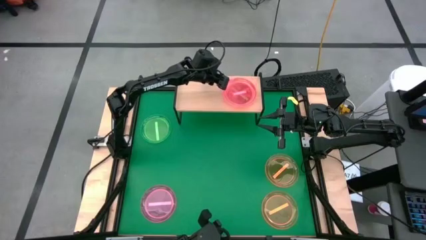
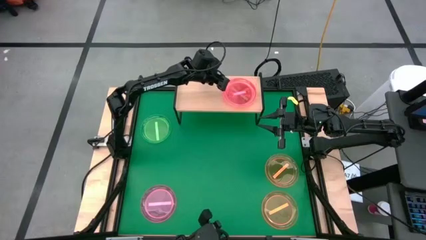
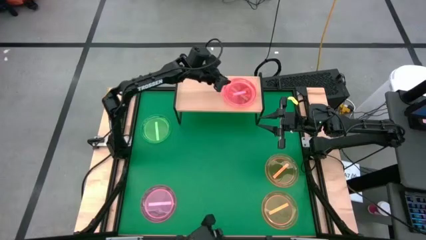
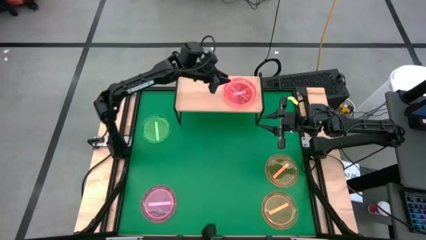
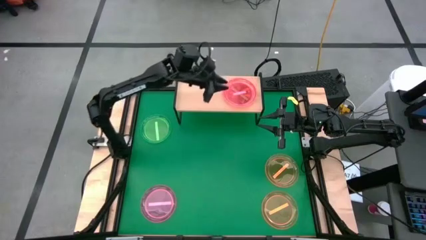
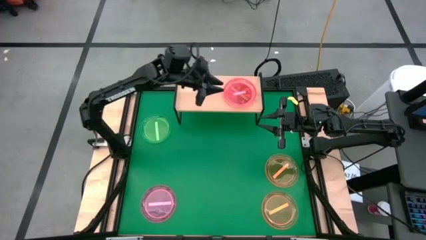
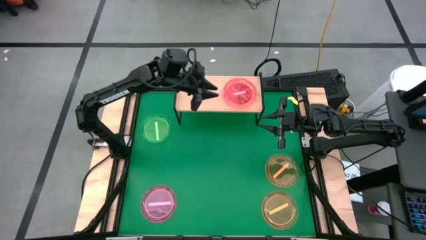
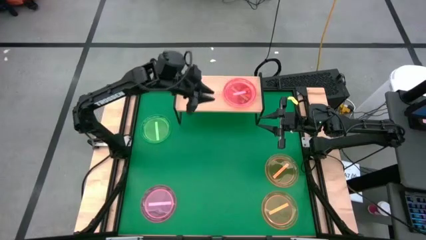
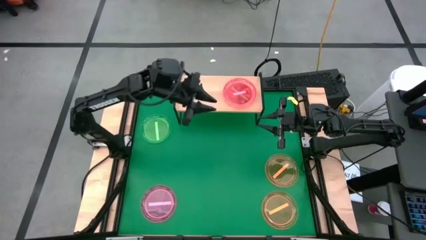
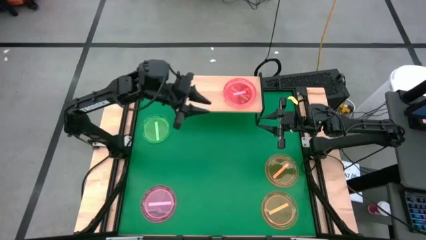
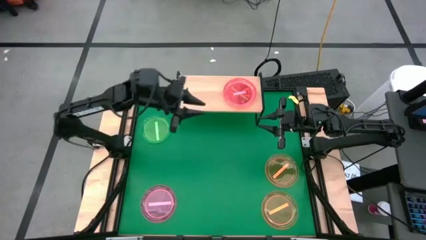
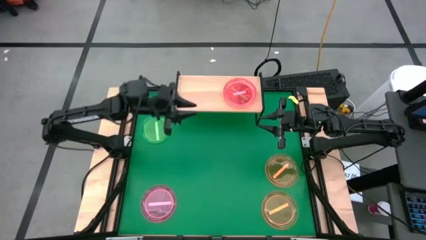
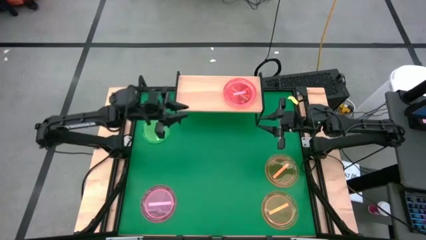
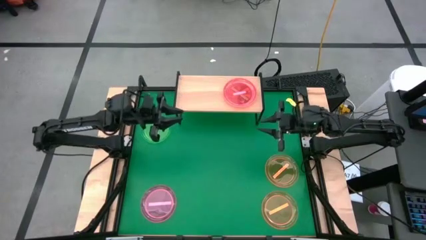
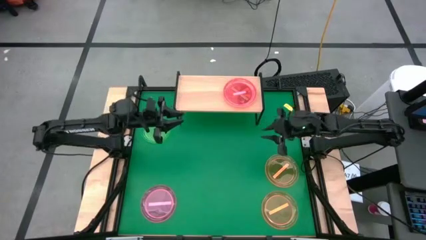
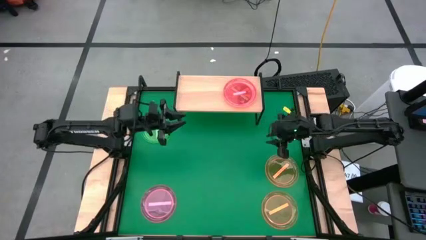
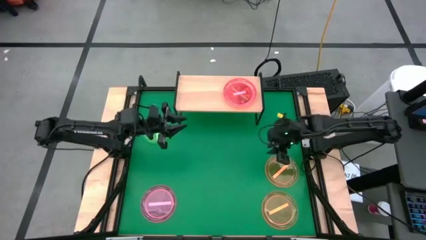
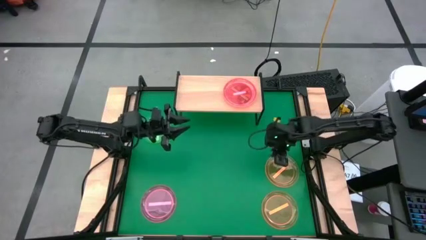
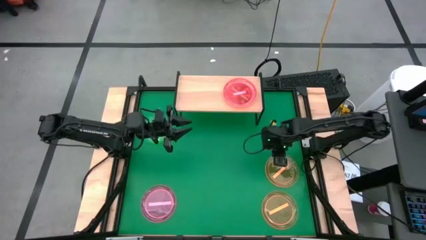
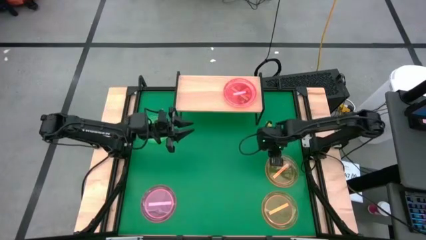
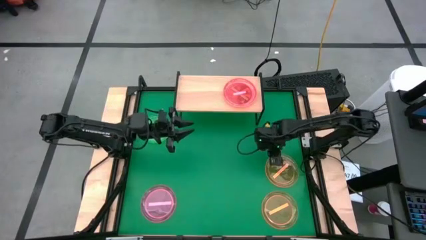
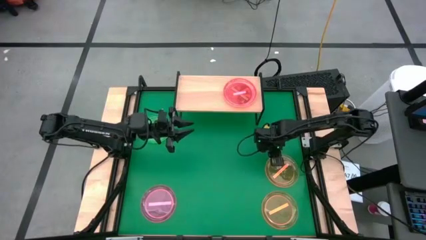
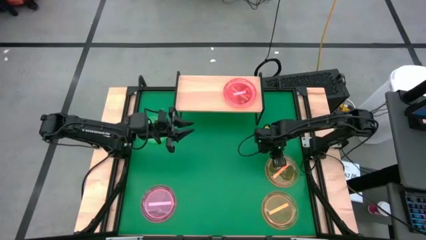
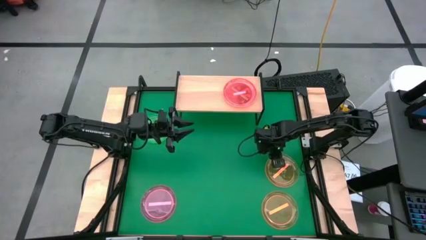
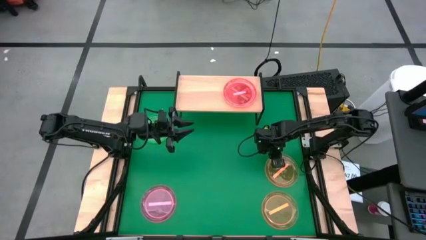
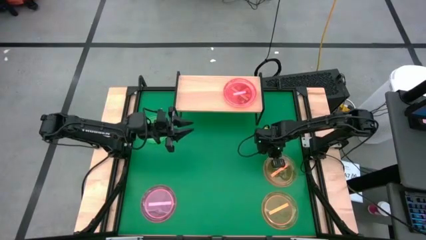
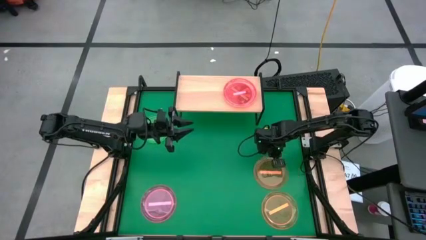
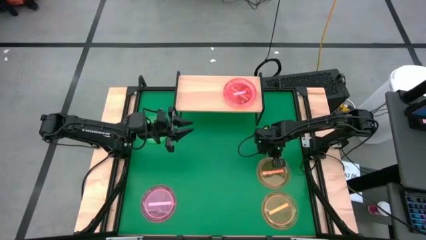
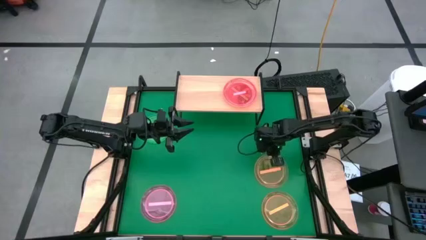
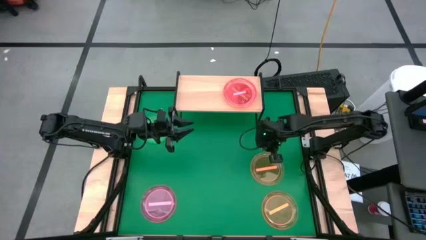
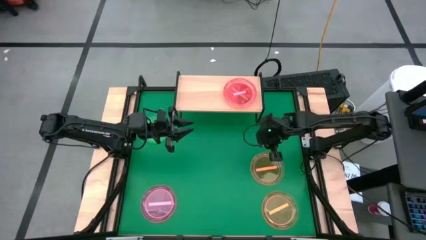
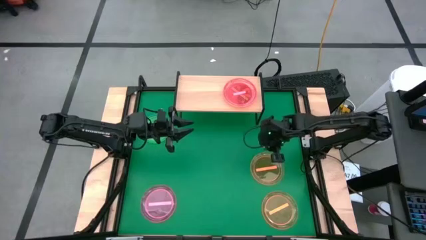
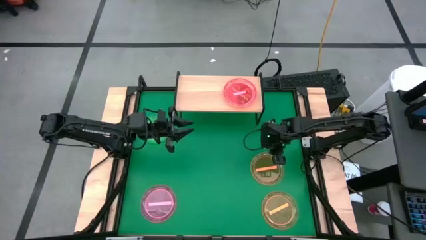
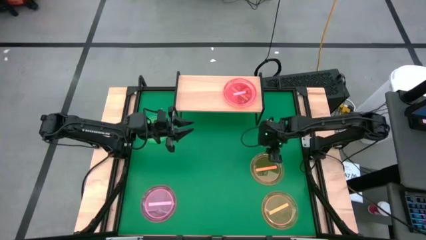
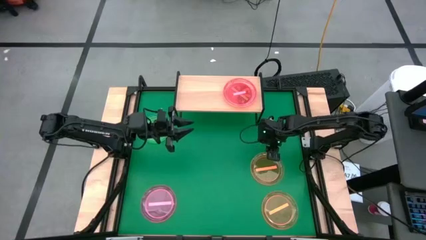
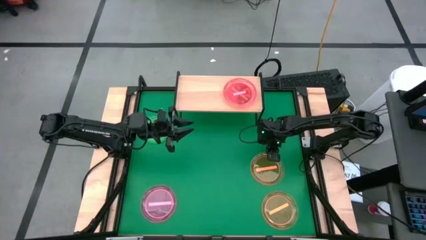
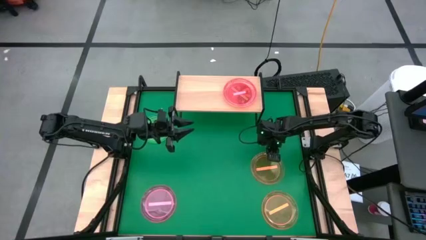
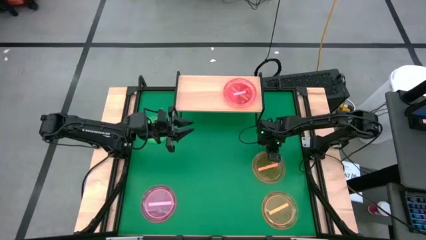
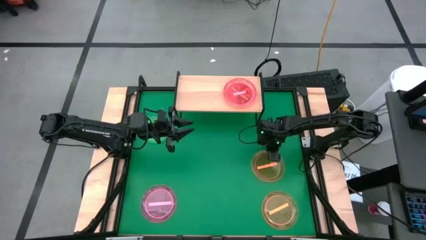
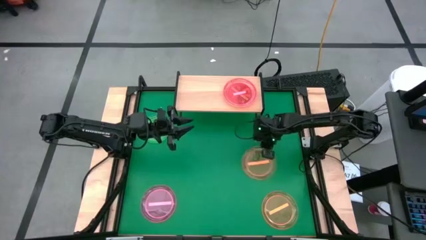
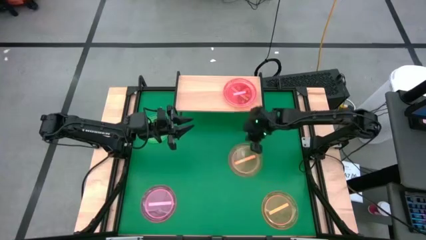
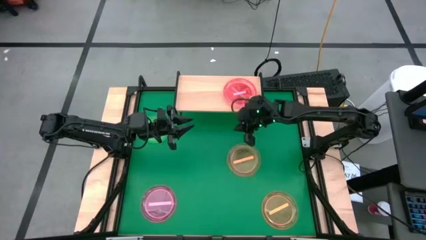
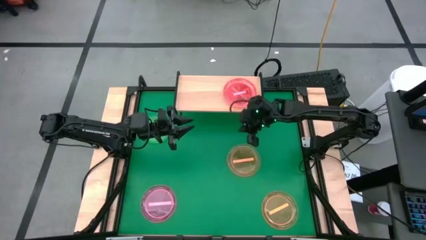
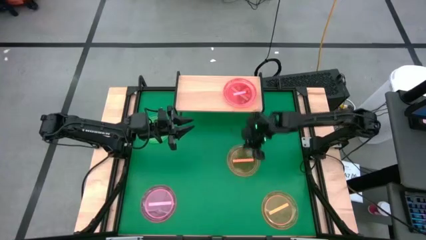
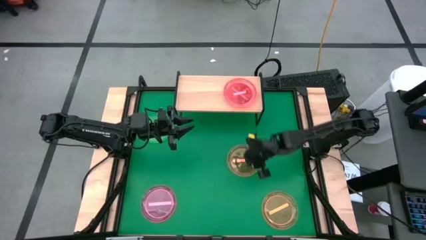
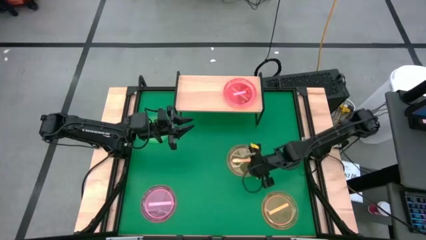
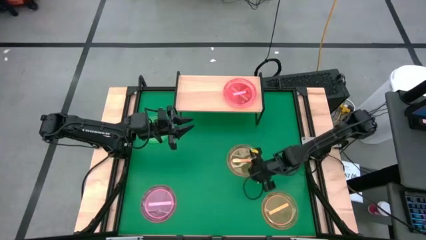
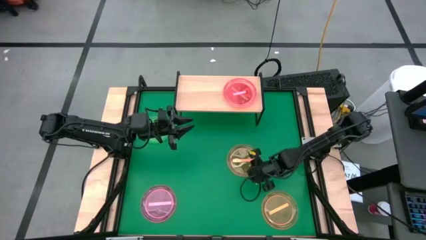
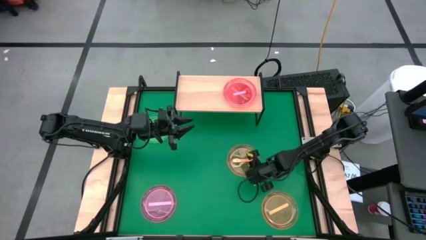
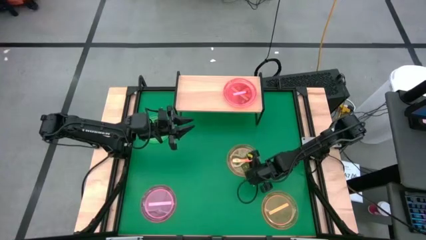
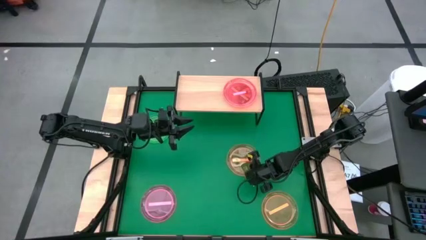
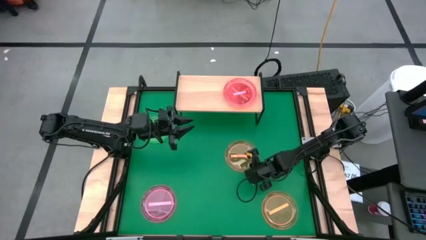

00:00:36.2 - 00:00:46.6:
Task: Place and stack plates onto a shelf
Put the orange plate on the shelf

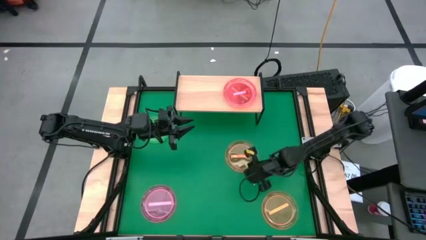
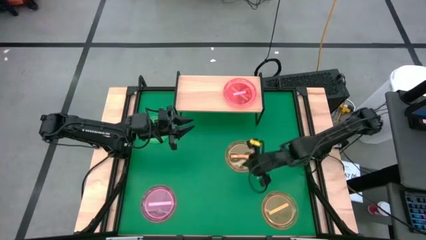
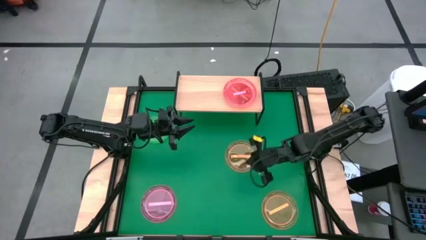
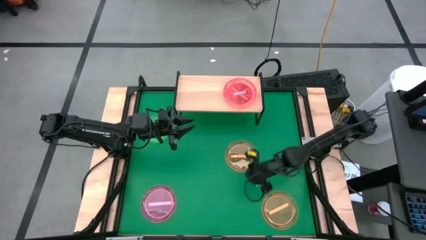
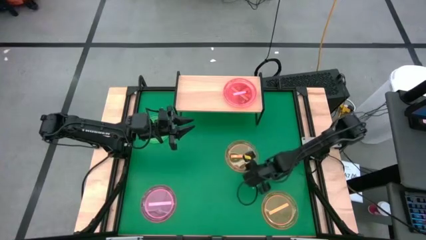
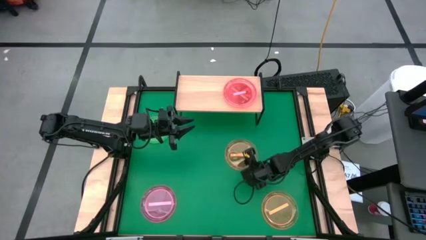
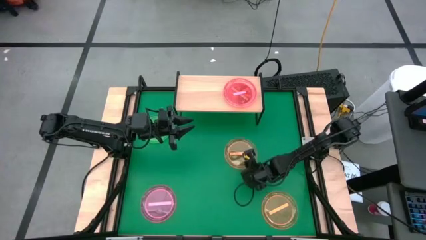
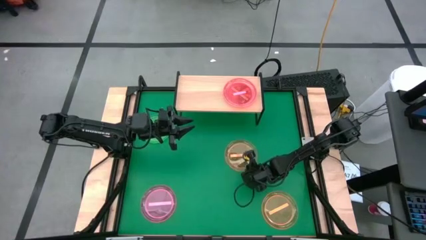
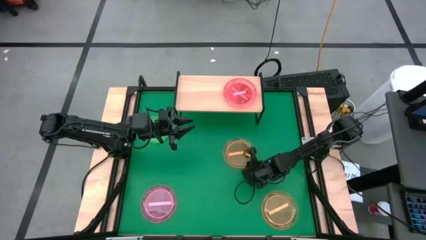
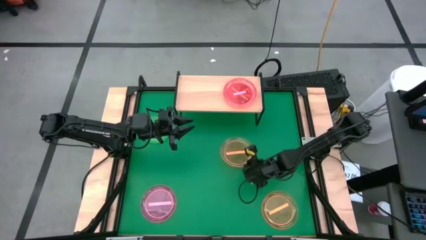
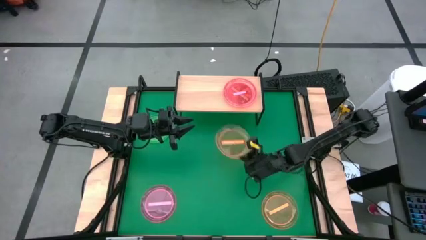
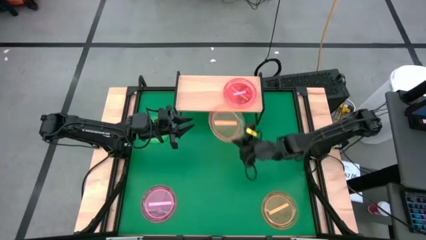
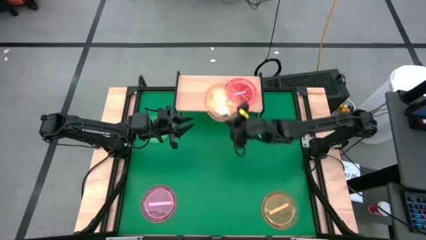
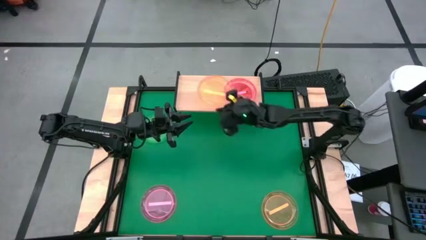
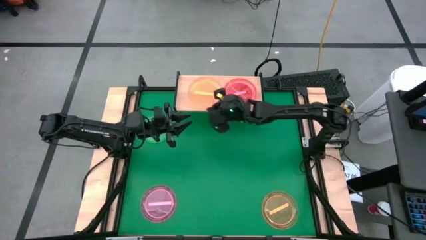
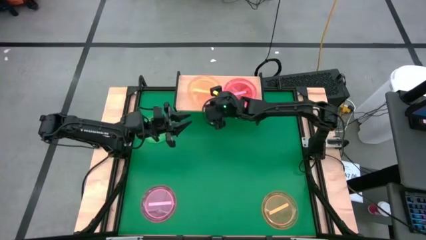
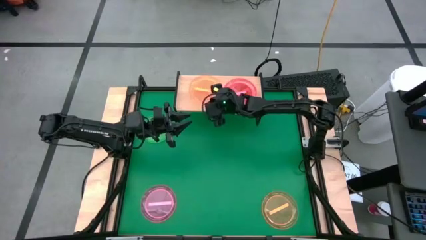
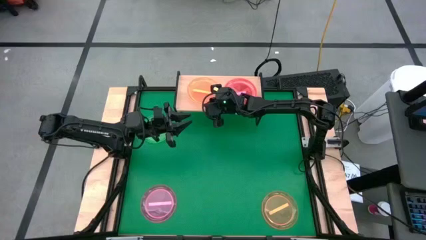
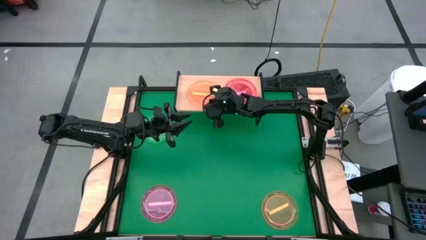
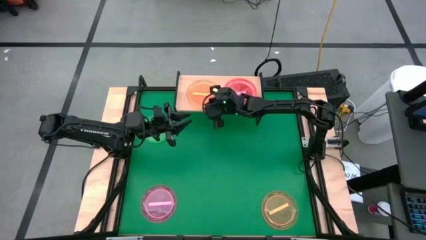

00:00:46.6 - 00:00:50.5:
Put the top orange plate on the shelf
